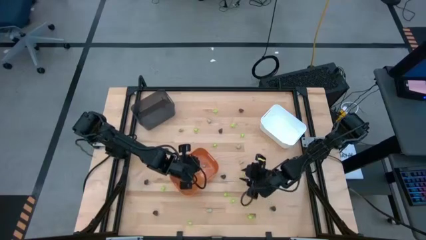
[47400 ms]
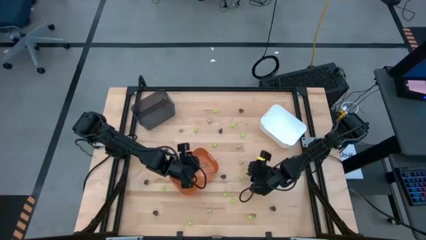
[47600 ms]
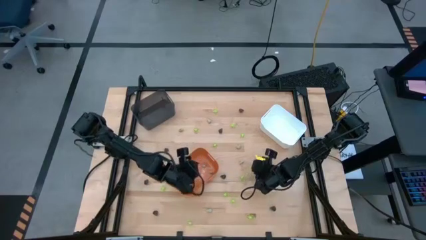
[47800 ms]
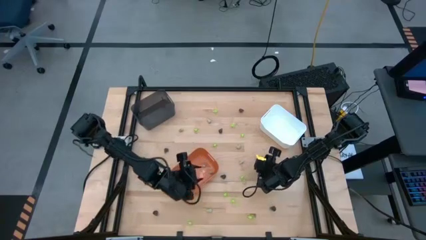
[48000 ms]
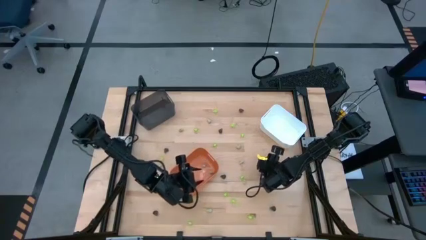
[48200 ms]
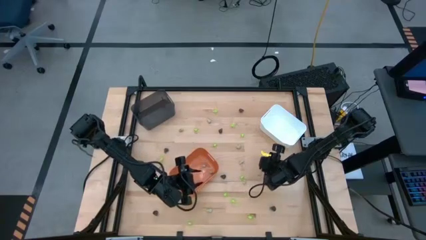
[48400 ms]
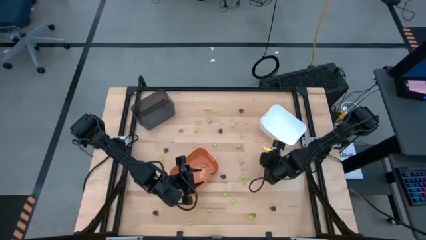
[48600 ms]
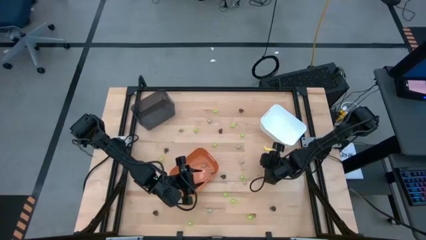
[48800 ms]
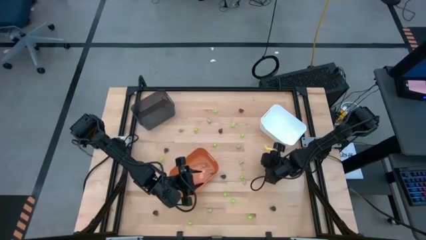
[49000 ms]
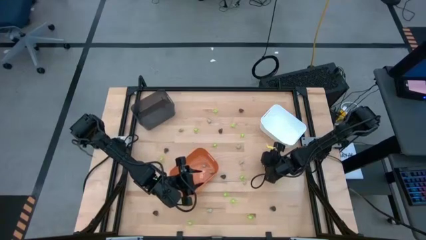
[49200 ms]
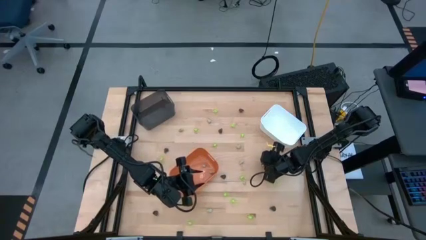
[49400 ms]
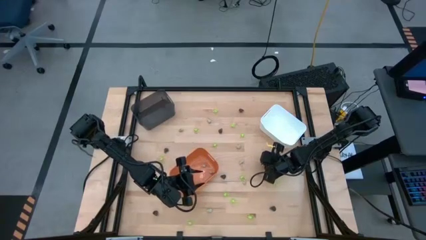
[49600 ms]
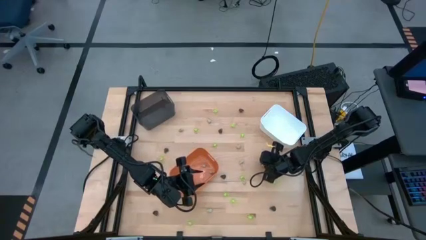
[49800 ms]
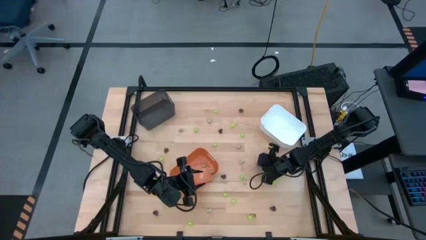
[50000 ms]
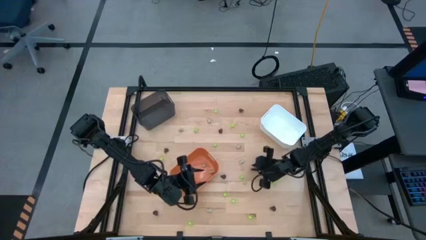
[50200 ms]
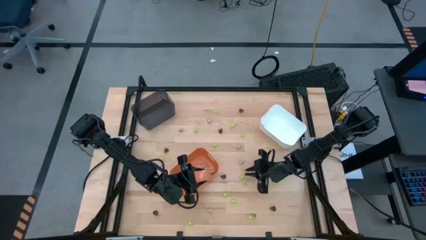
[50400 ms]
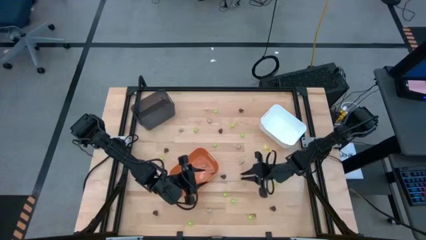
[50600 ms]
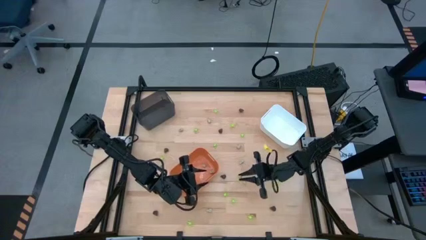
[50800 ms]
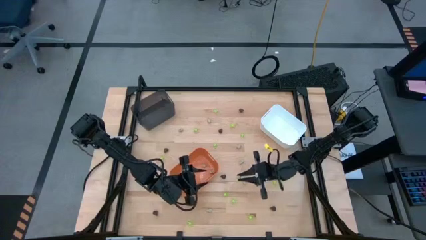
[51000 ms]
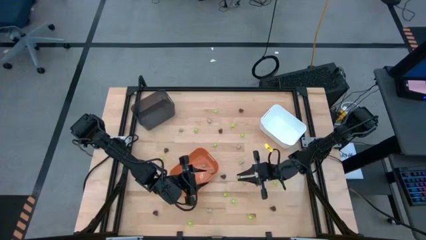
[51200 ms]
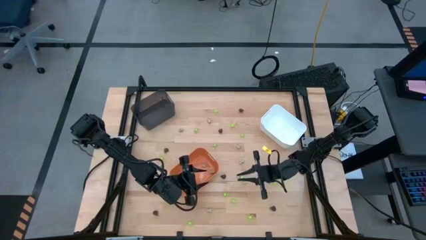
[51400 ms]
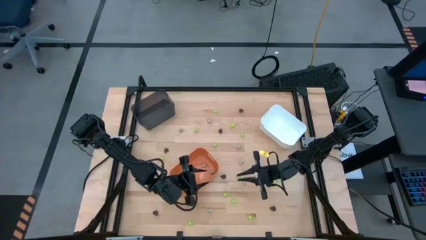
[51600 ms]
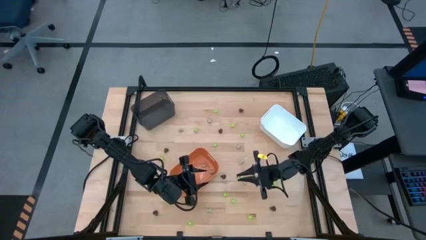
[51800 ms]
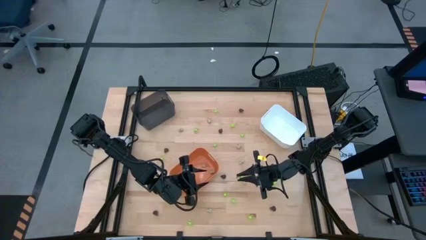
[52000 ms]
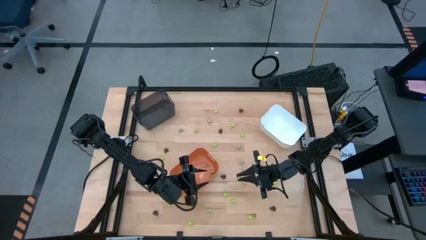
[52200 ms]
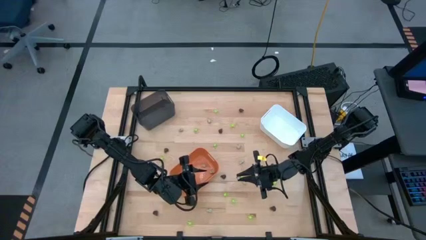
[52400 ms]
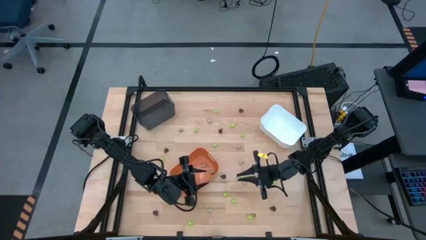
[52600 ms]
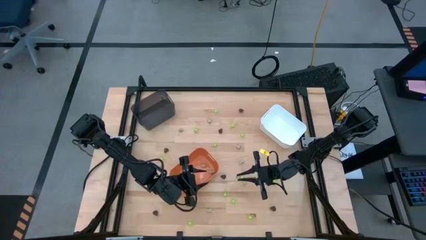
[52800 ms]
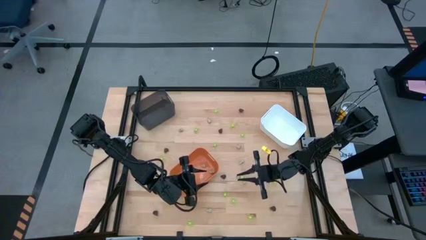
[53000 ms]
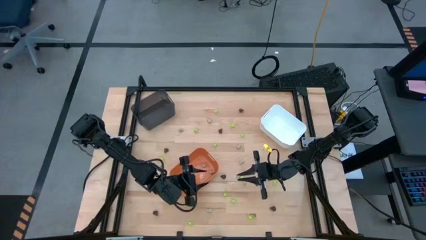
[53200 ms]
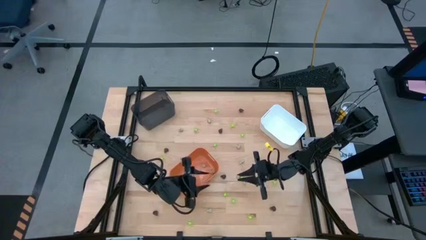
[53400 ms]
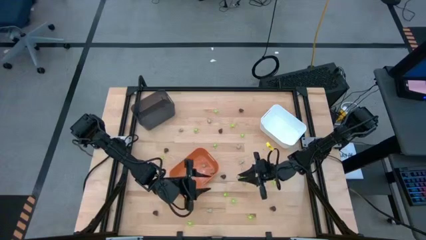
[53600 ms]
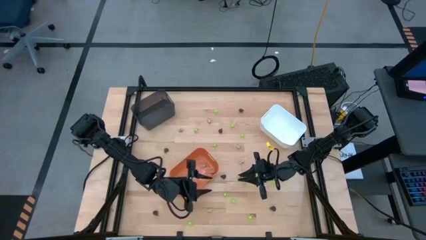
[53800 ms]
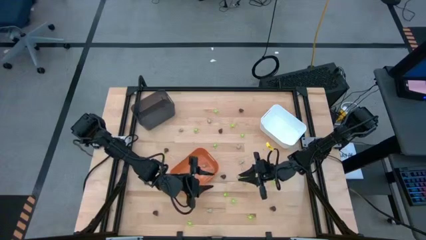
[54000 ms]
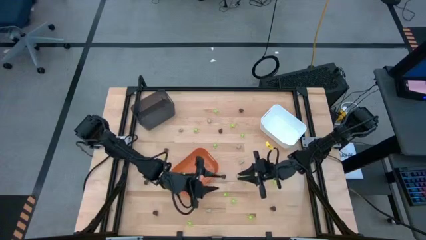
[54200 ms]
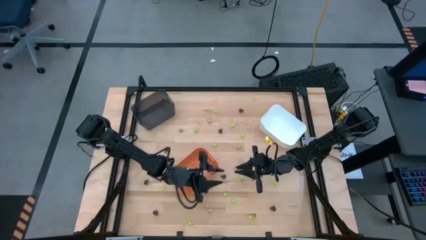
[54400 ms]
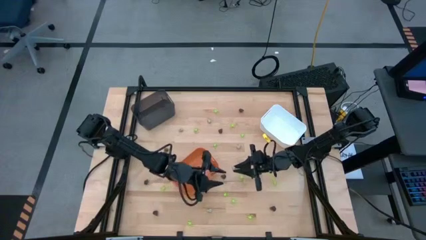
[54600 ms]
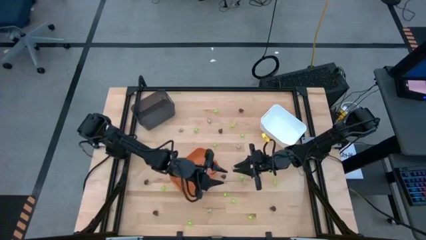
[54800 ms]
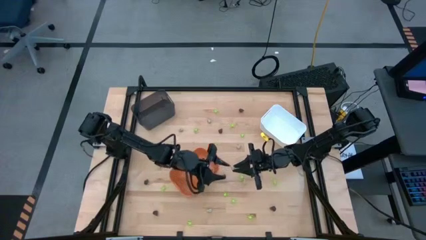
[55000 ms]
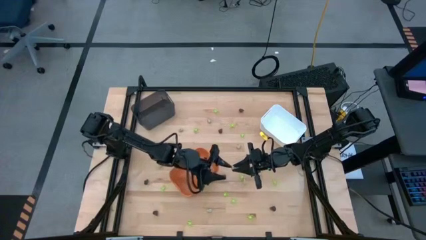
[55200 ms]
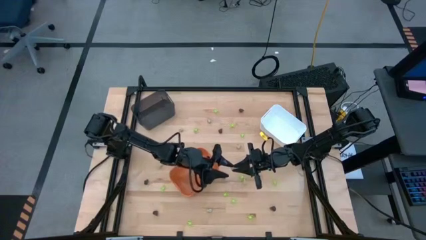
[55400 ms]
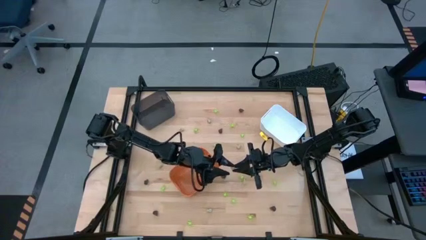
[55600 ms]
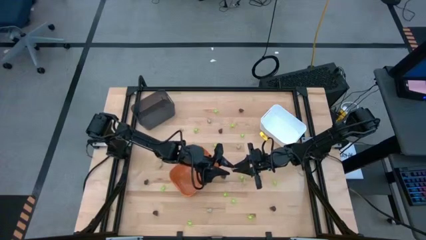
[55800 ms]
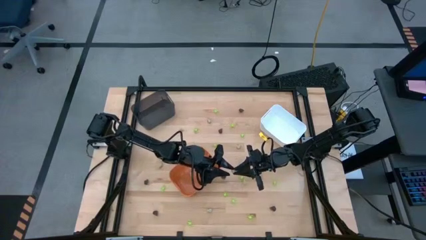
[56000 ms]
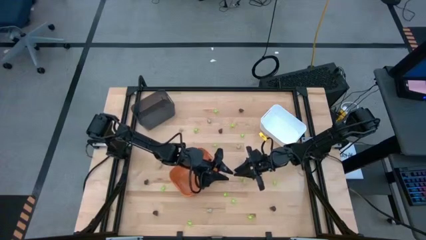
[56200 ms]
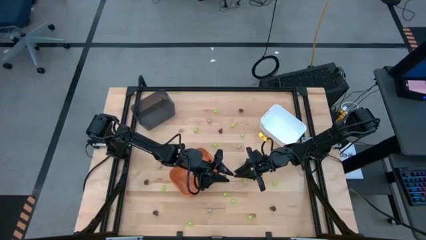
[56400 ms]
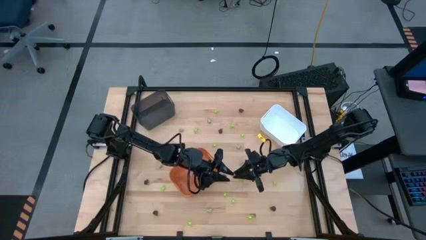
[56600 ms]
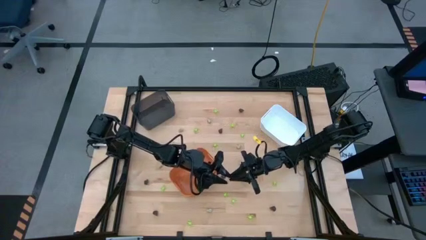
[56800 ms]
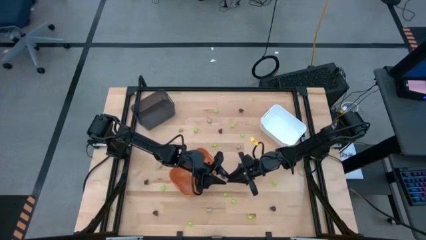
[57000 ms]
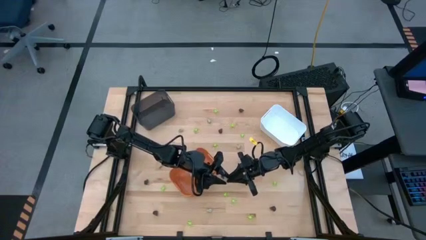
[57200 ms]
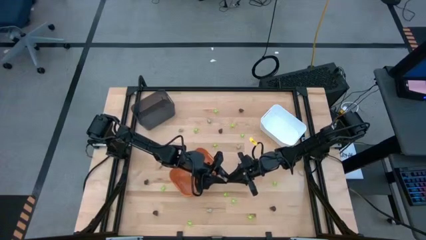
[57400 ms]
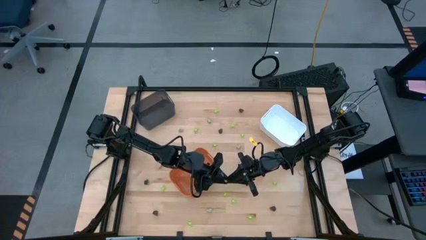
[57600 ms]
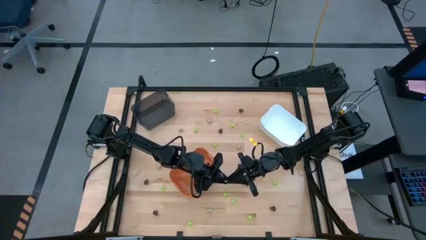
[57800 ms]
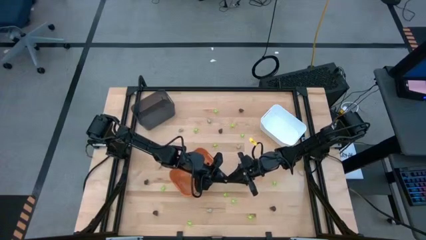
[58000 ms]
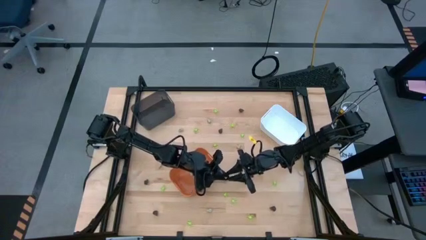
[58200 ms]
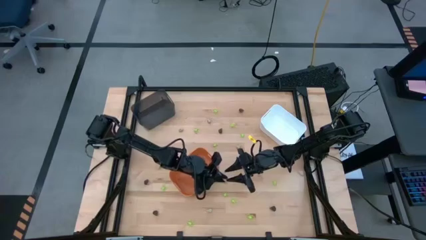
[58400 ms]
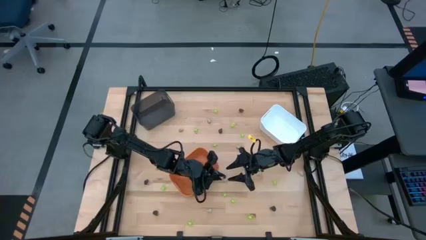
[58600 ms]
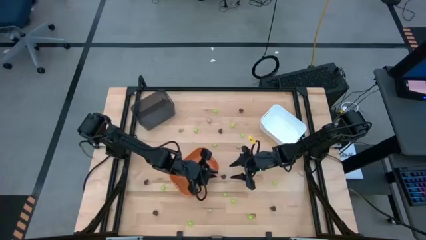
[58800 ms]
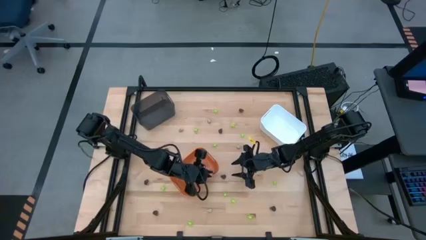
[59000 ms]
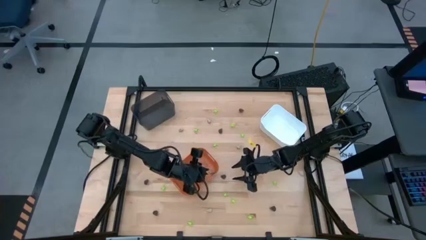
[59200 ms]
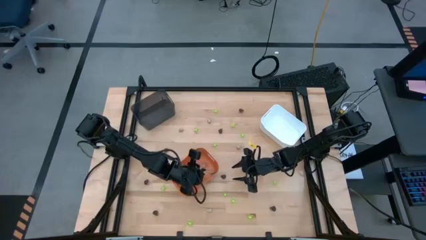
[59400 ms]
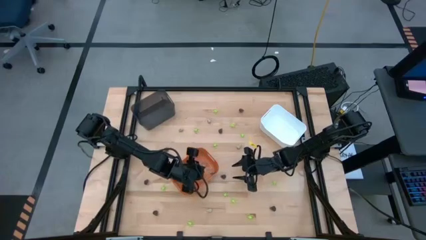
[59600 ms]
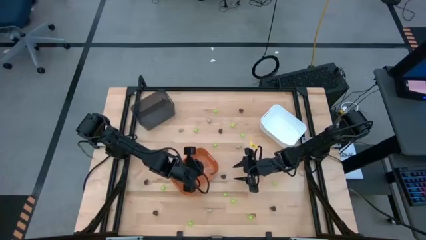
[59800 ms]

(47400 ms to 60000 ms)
Task: Sort Halloween decoration
Put the small white skull toy into the orange bin
